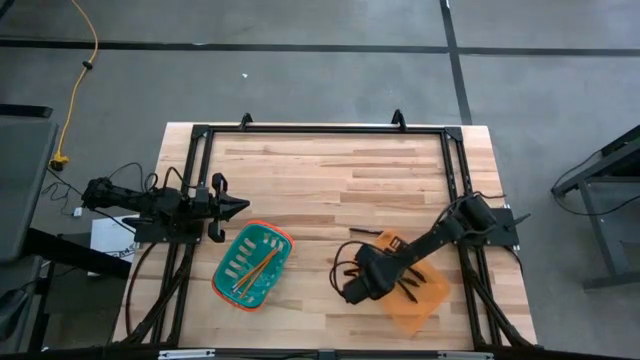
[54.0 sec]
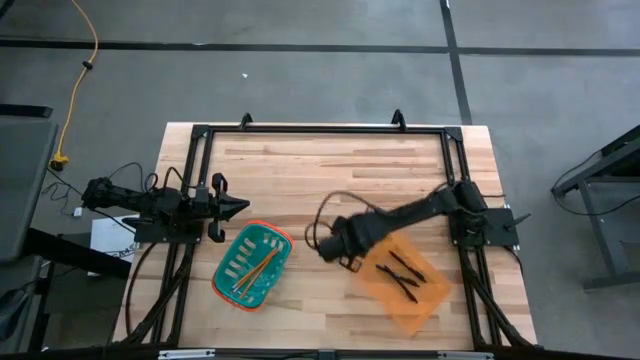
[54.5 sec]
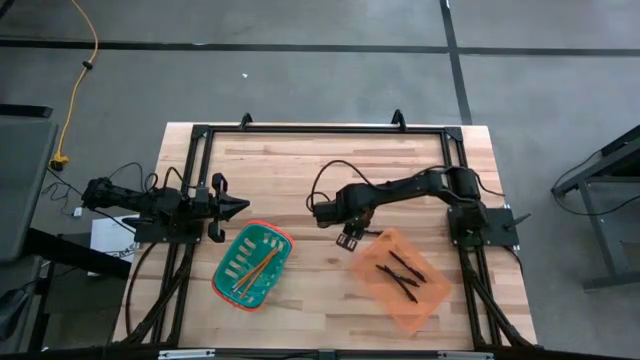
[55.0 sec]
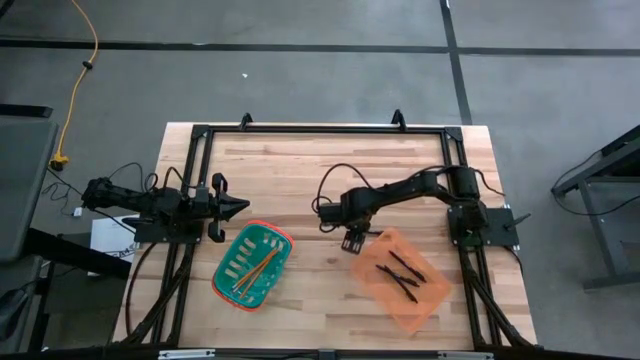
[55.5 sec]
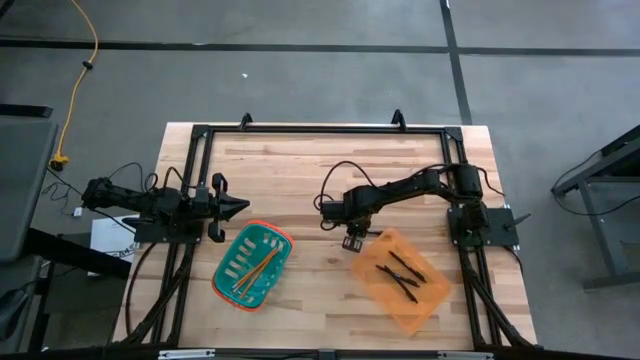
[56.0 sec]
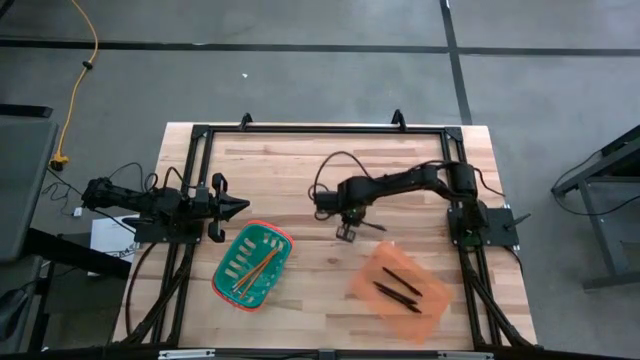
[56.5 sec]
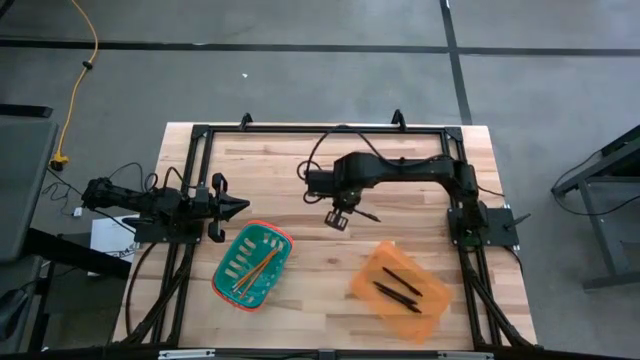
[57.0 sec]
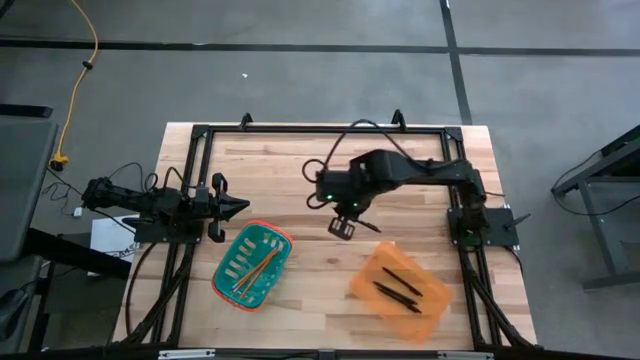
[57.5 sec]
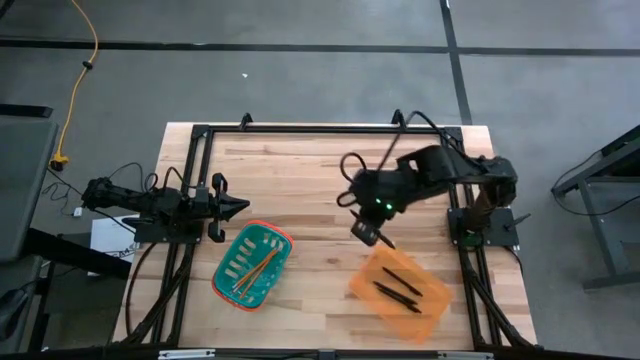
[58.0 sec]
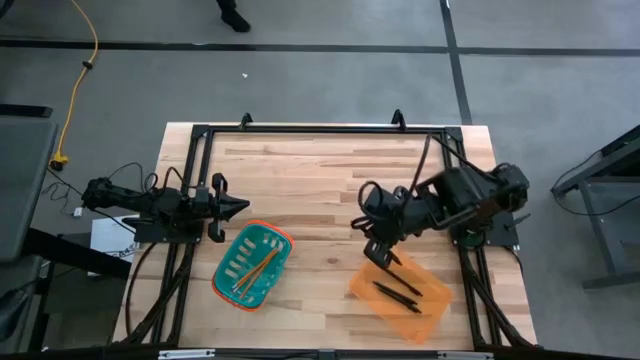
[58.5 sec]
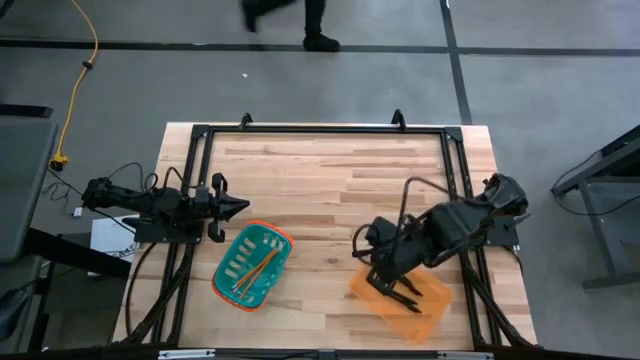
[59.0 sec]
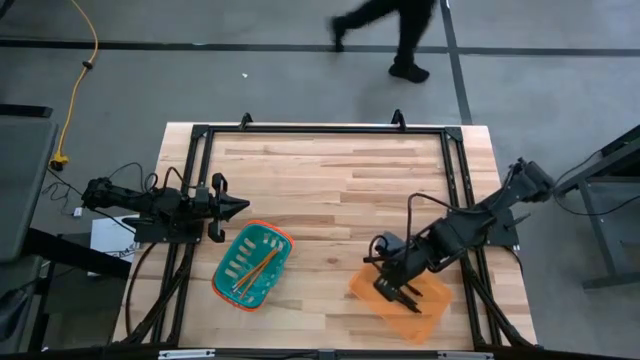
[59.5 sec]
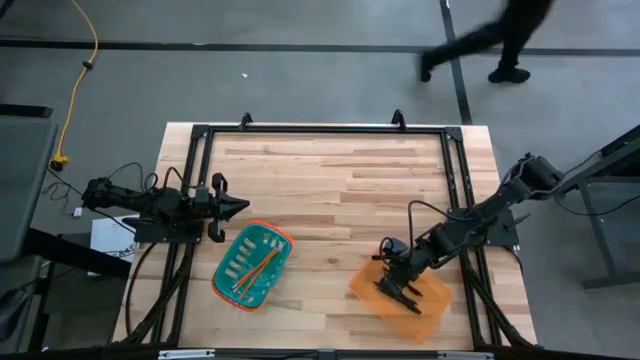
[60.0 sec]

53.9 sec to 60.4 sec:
Task: Sort pens & pencils
Put the black pen into the orange bin

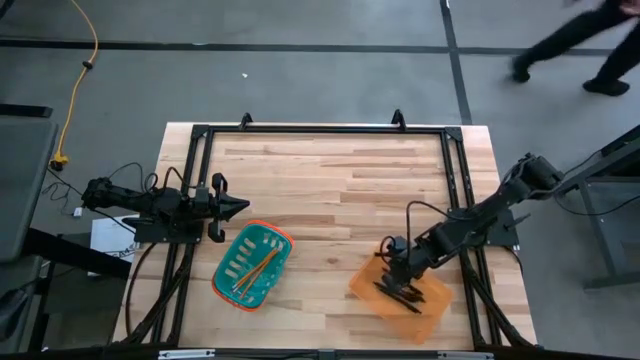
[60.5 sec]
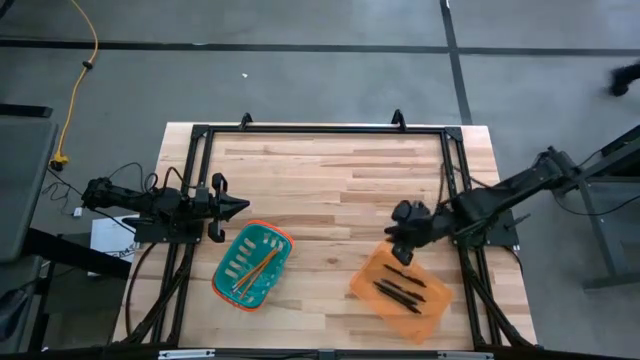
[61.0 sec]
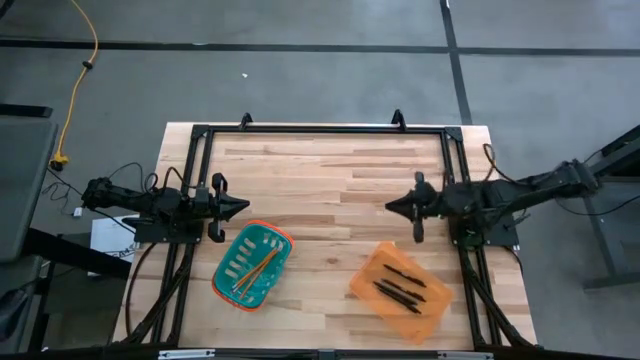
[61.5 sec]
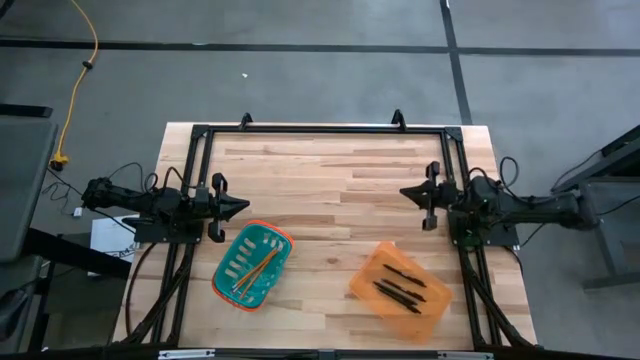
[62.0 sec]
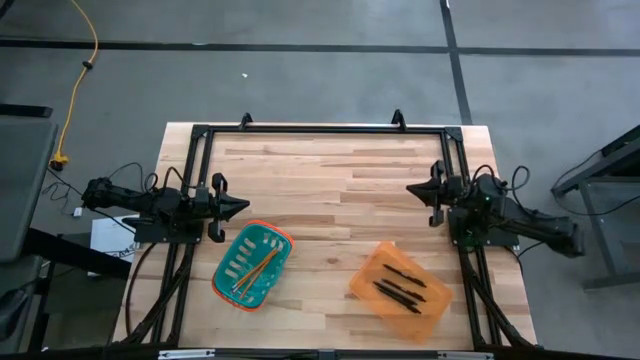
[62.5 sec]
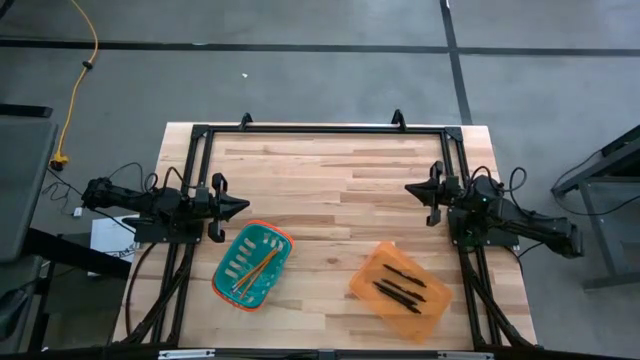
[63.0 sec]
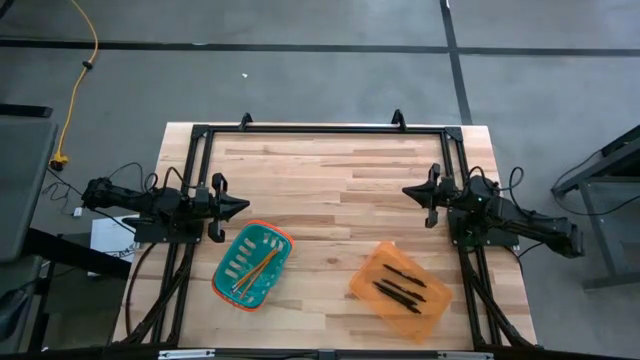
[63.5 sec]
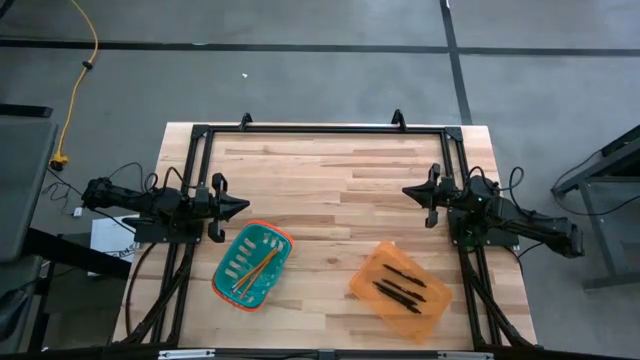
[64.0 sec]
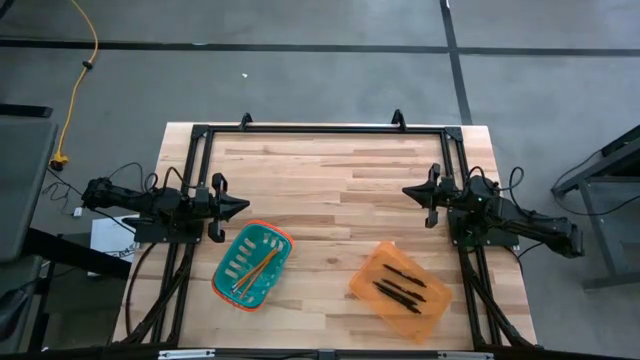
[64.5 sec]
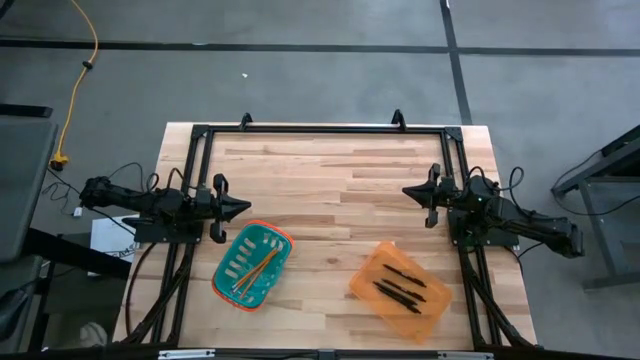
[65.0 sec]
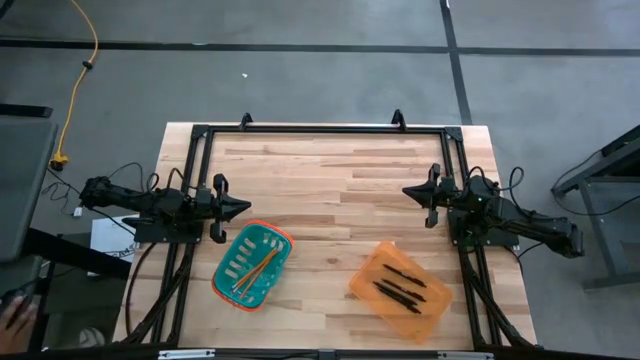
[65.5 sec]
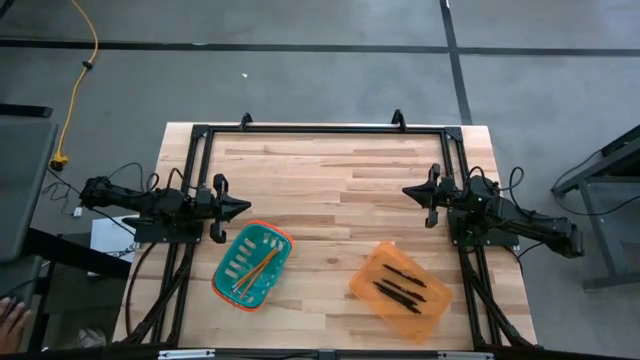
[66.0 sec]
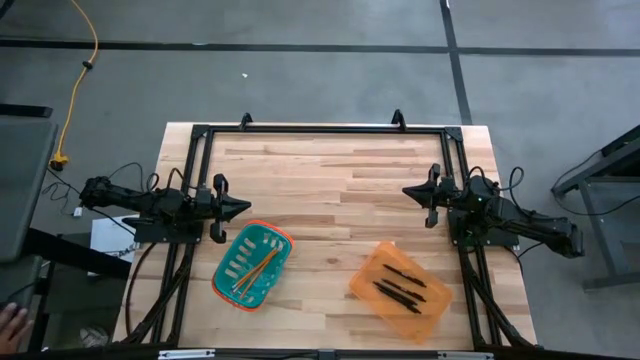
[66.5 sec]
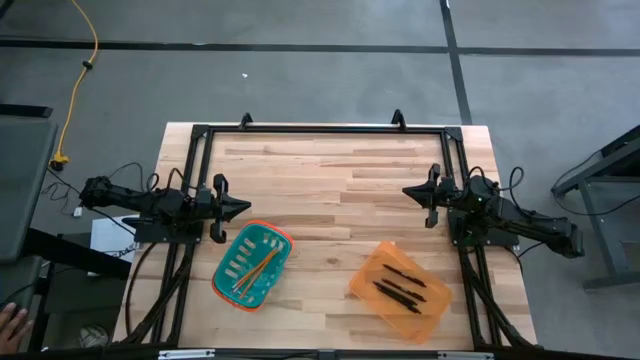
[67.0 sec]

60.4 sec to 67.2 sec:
Return to Home Position

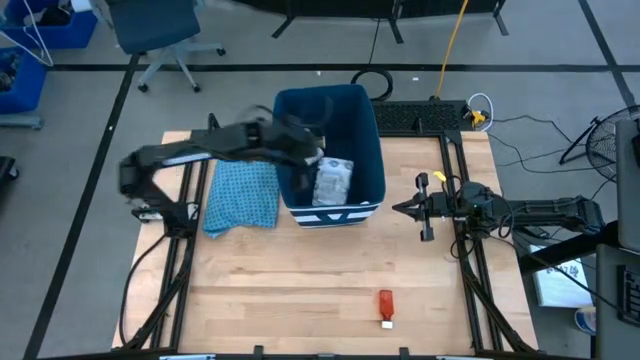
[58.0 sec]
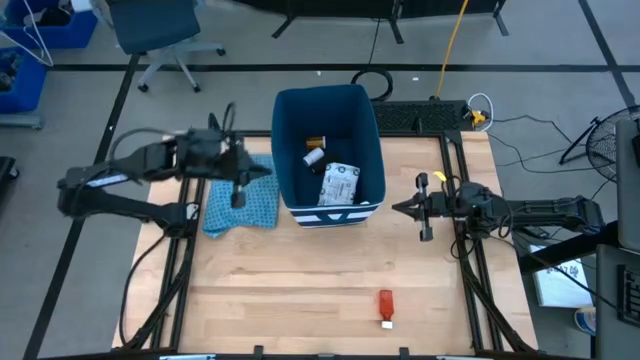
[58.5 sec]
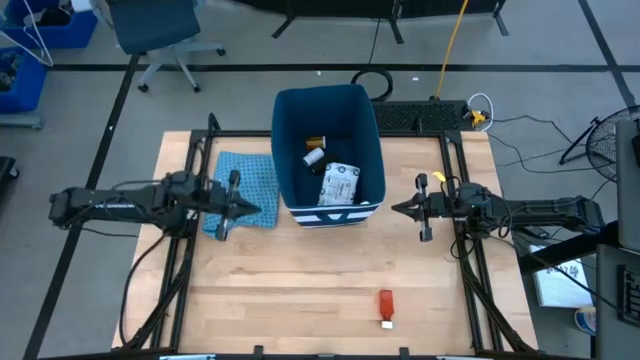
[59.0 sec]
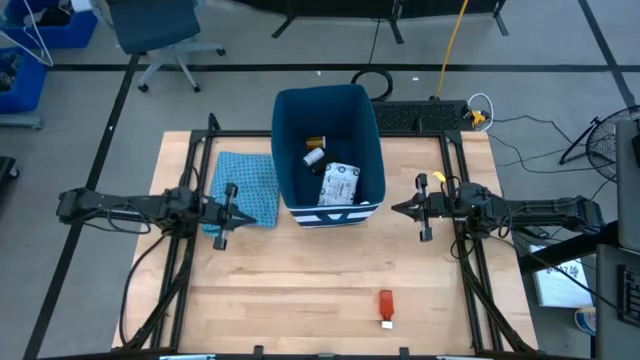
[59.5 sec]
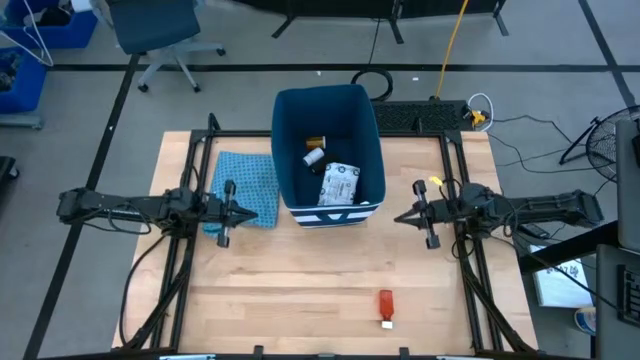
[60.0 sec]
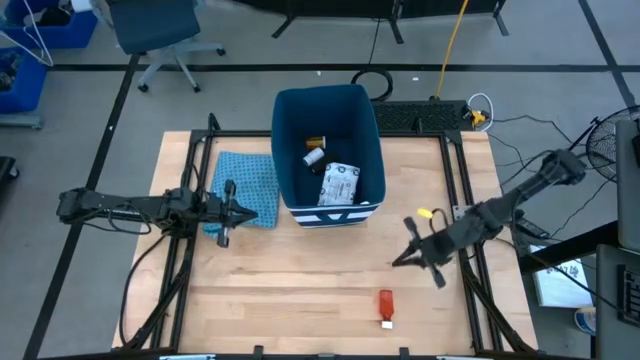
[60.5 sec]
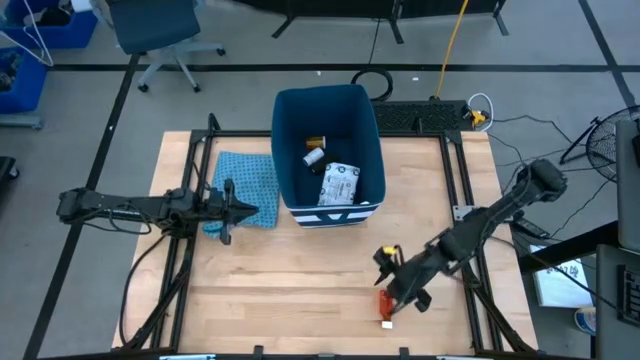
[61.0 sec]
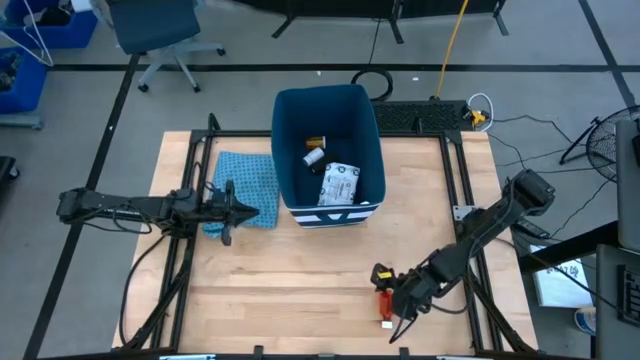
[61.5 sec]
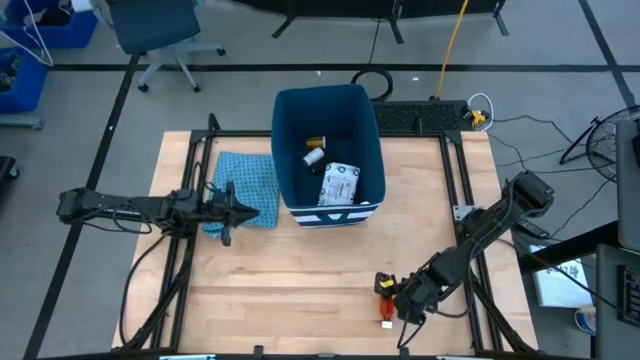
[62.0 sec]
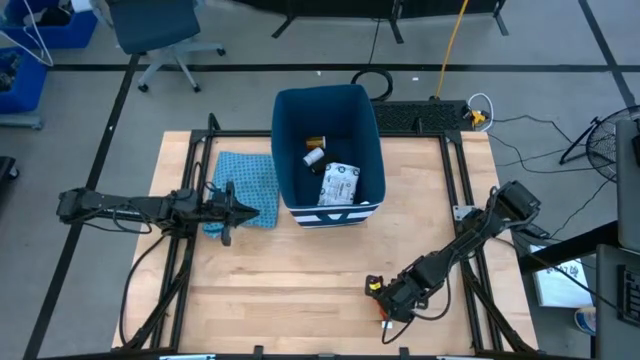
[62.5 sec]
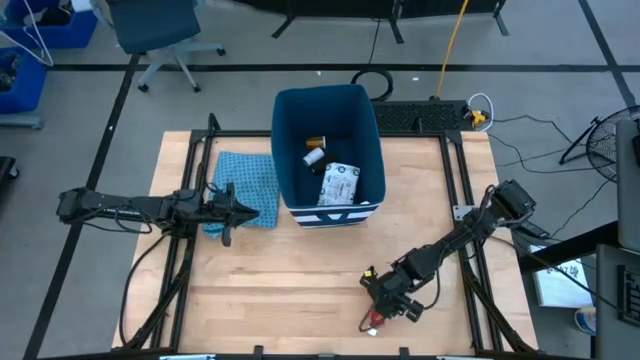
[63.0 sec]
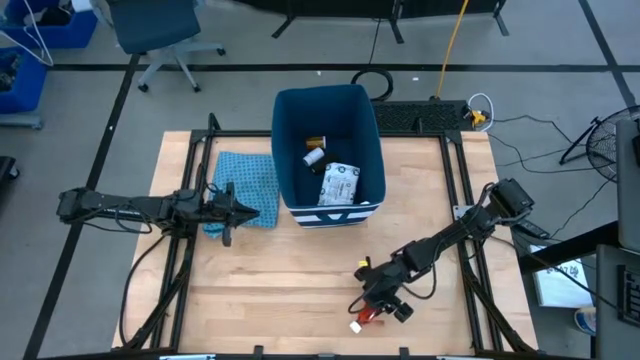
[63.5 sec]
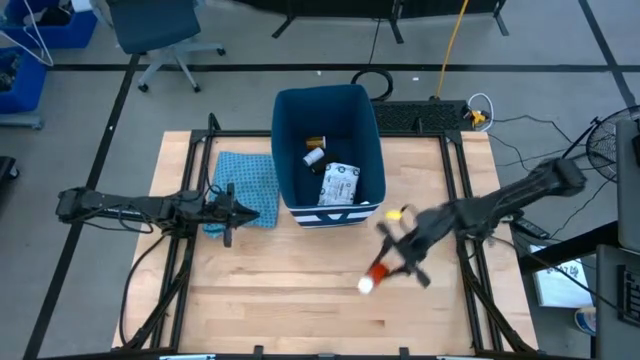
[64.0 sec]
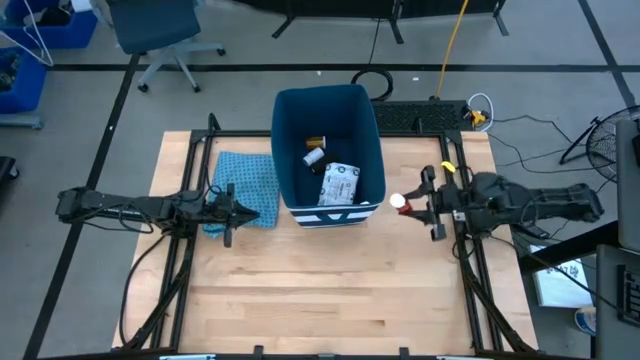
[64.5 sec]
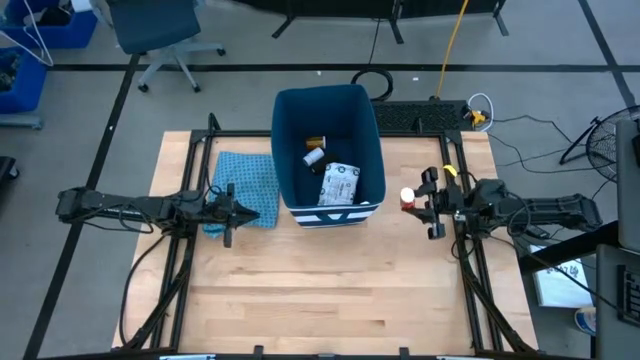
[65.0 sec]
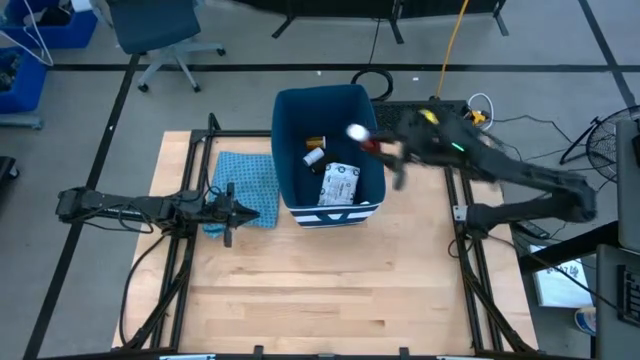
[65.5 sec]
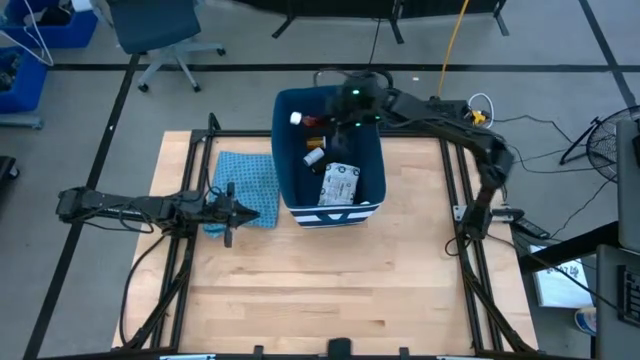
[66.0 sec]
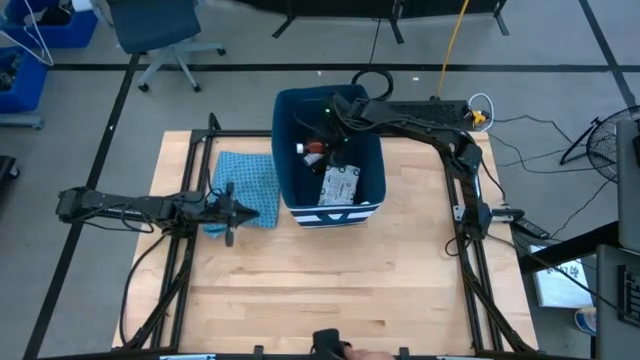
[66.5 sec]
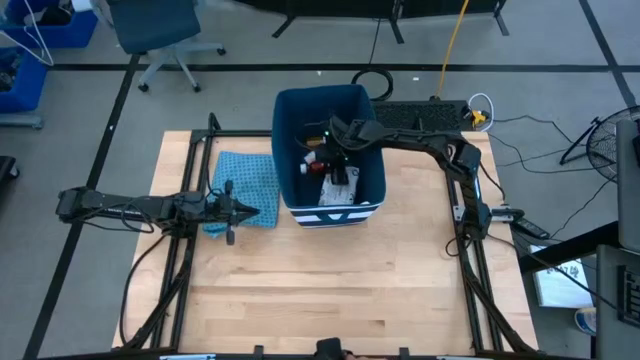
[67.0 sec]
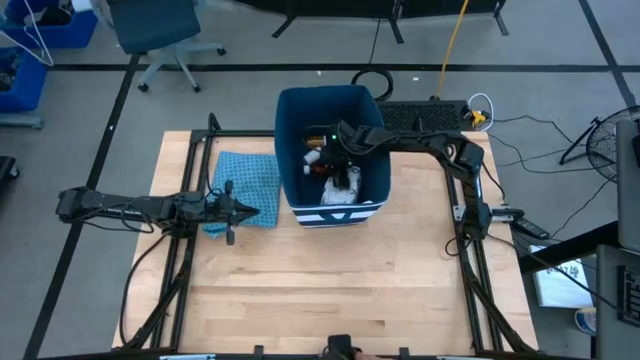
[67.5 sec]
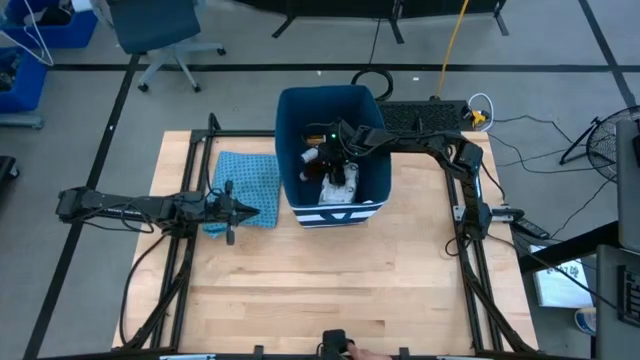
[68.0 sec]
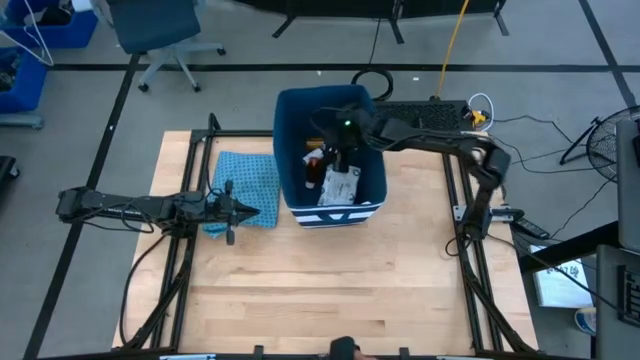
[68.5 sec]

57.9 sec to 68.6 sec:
Task: Pick & place medical supplies in basket/bin
Put the red pill bottle into the blue bin
